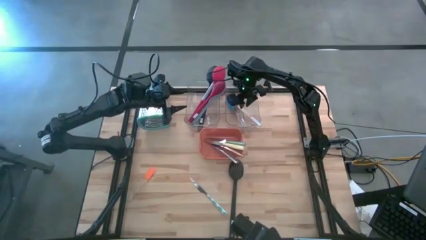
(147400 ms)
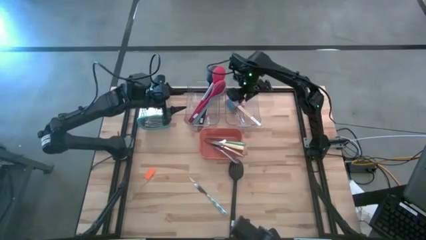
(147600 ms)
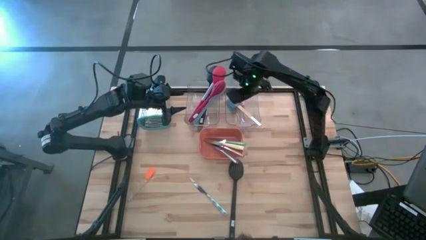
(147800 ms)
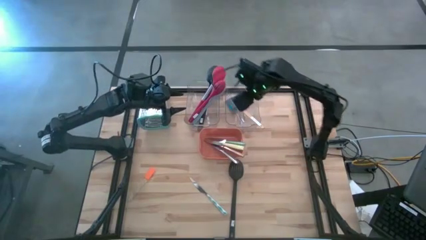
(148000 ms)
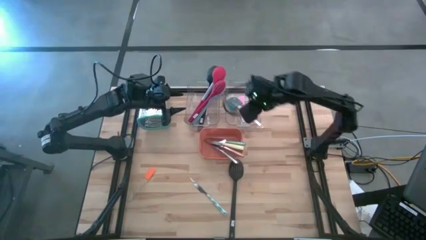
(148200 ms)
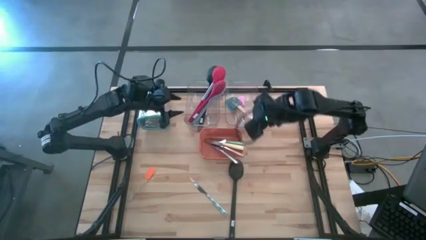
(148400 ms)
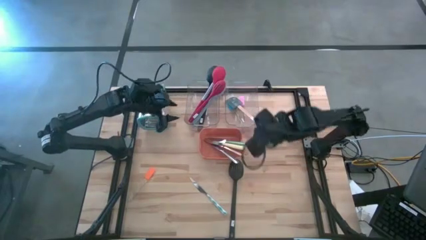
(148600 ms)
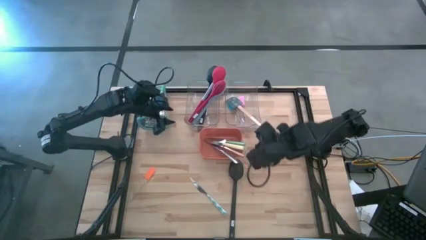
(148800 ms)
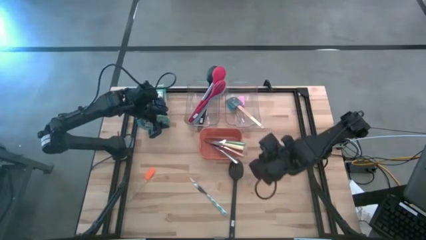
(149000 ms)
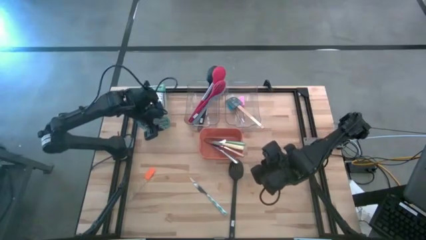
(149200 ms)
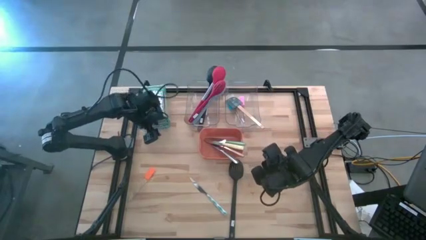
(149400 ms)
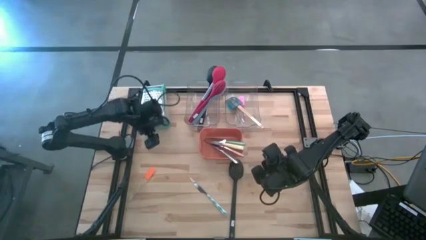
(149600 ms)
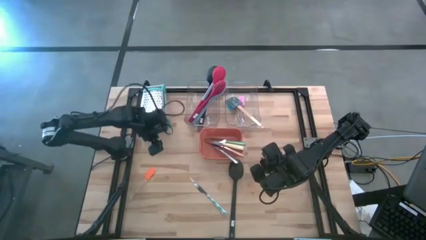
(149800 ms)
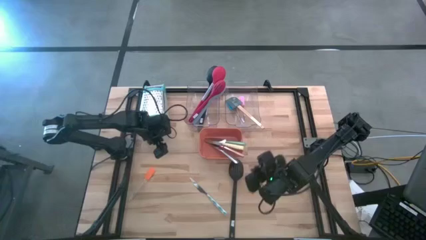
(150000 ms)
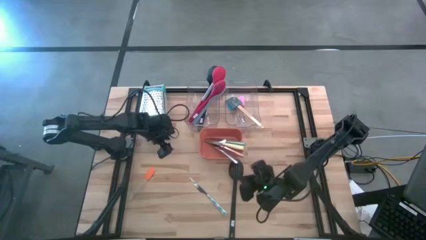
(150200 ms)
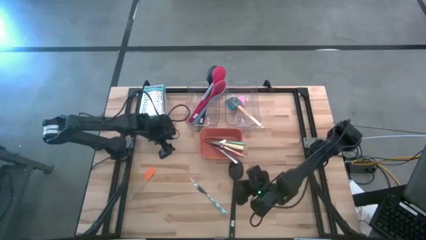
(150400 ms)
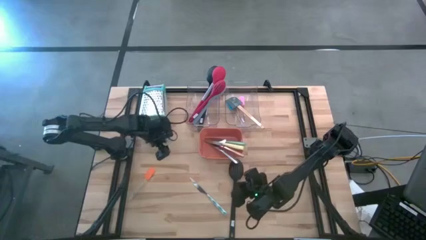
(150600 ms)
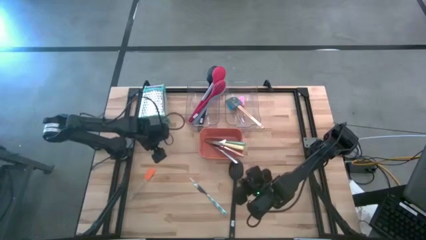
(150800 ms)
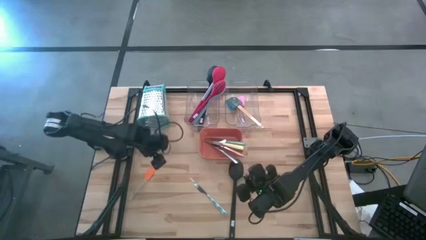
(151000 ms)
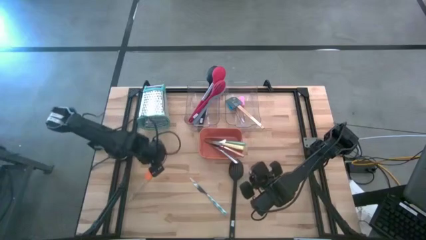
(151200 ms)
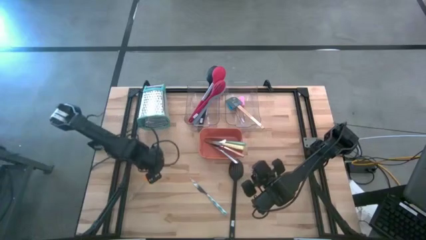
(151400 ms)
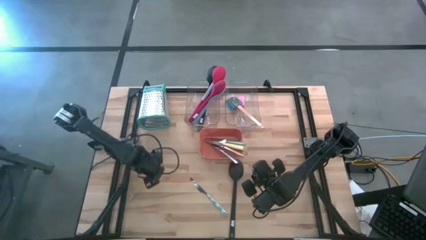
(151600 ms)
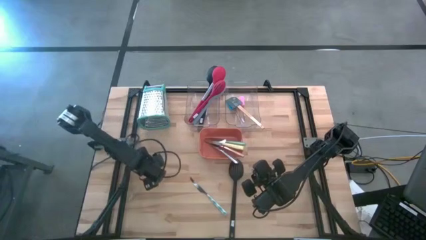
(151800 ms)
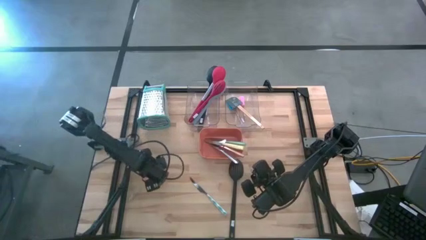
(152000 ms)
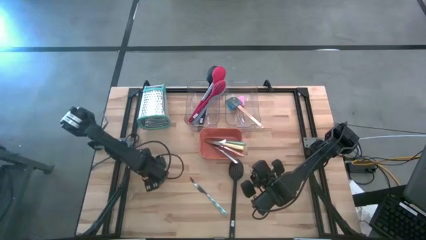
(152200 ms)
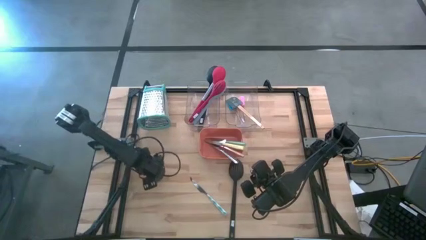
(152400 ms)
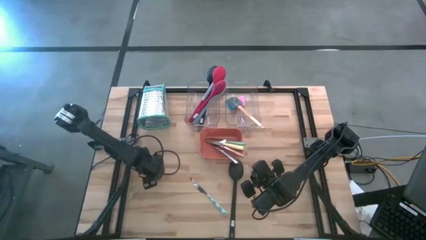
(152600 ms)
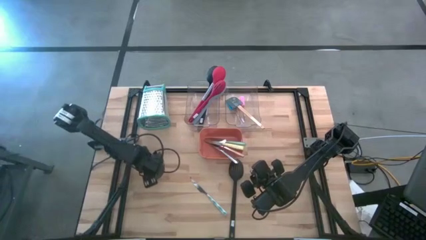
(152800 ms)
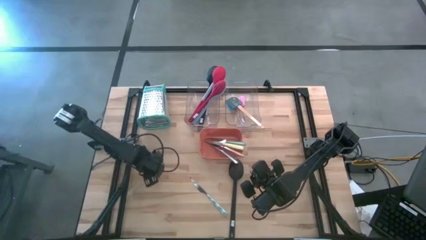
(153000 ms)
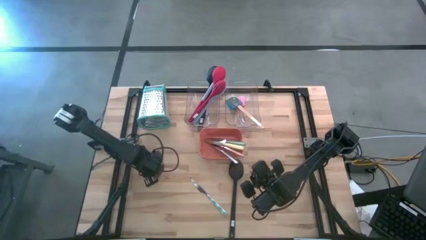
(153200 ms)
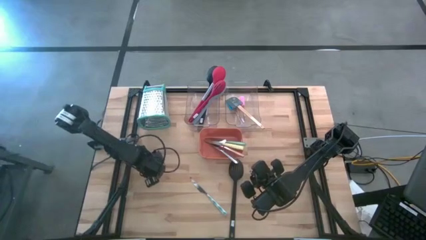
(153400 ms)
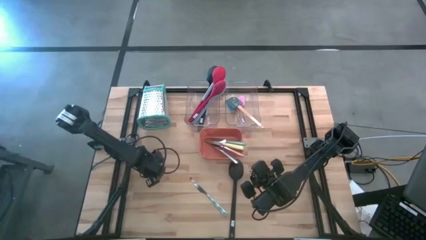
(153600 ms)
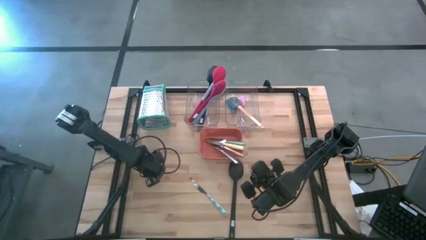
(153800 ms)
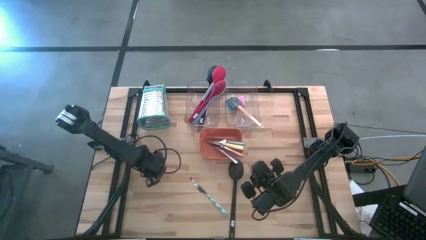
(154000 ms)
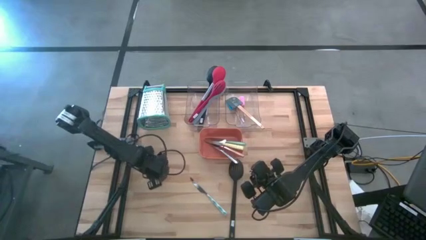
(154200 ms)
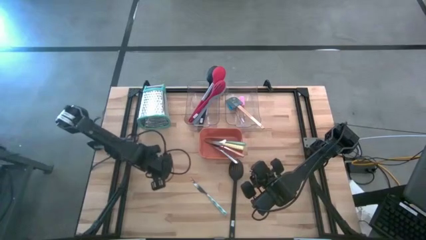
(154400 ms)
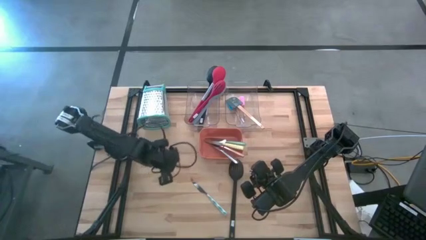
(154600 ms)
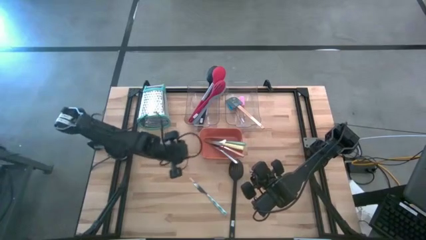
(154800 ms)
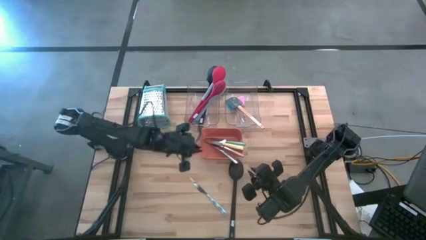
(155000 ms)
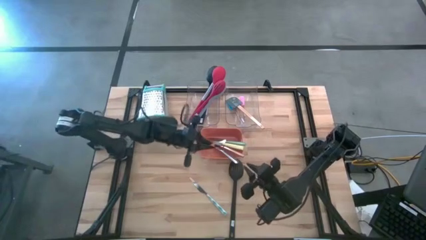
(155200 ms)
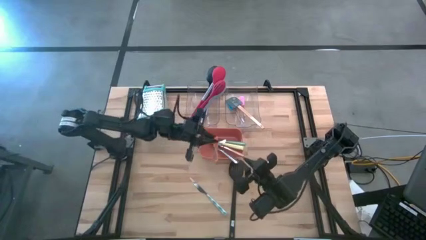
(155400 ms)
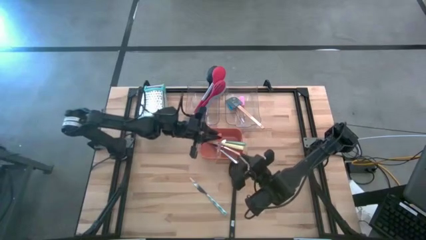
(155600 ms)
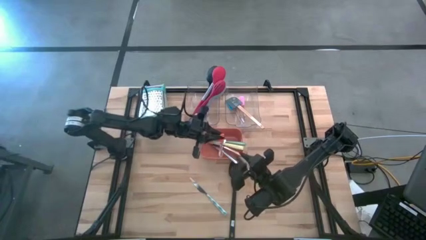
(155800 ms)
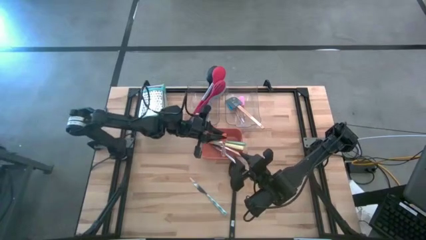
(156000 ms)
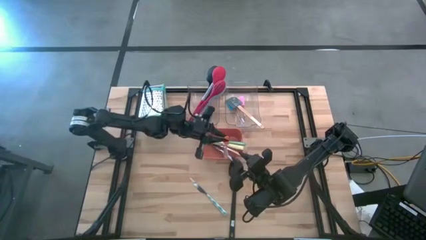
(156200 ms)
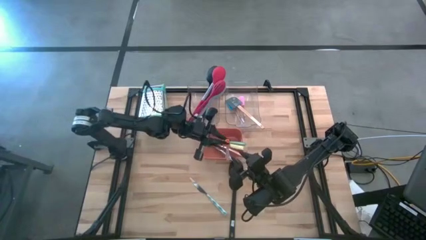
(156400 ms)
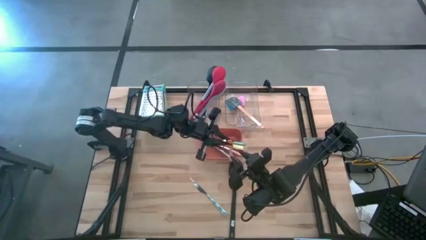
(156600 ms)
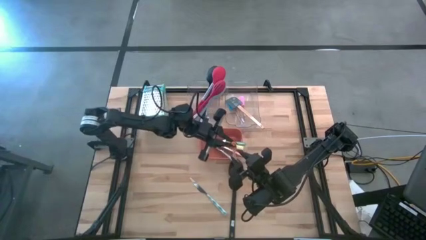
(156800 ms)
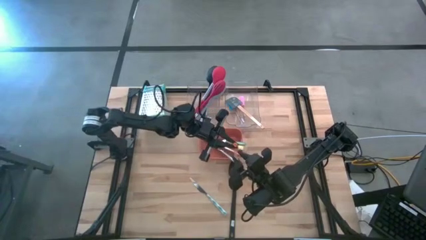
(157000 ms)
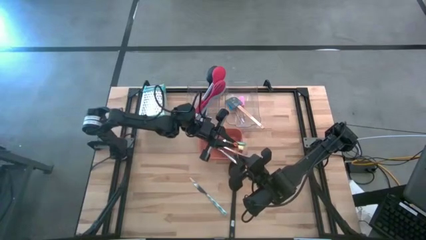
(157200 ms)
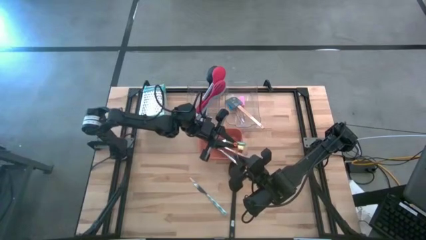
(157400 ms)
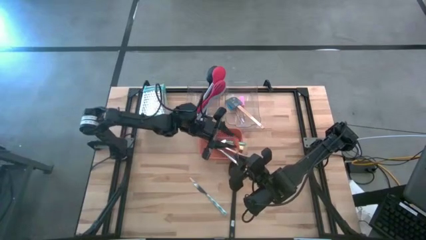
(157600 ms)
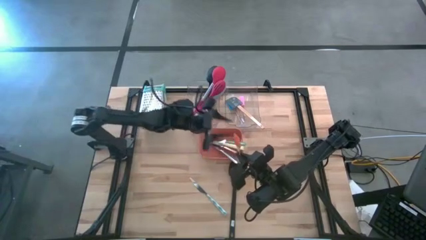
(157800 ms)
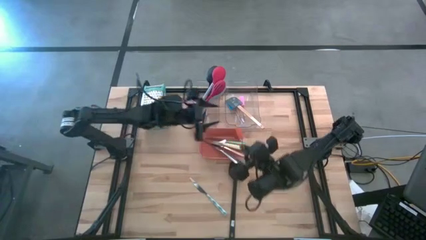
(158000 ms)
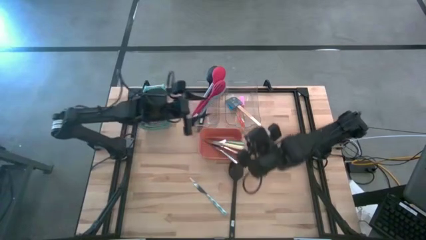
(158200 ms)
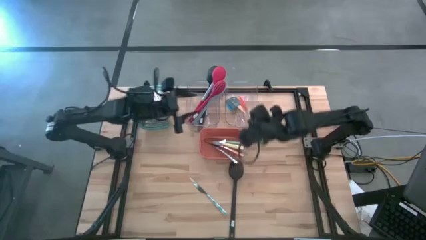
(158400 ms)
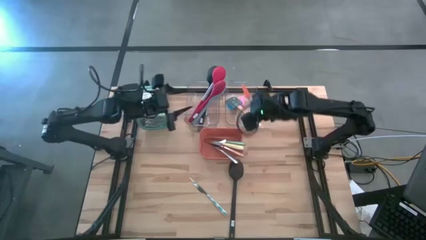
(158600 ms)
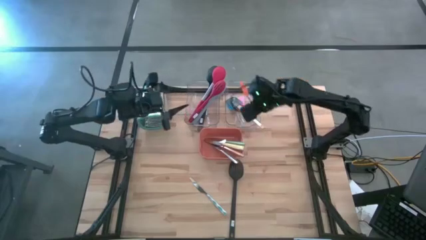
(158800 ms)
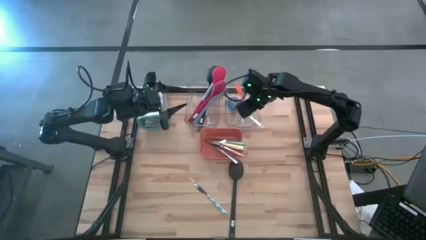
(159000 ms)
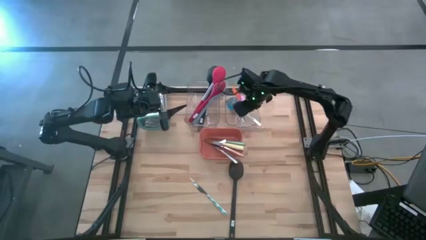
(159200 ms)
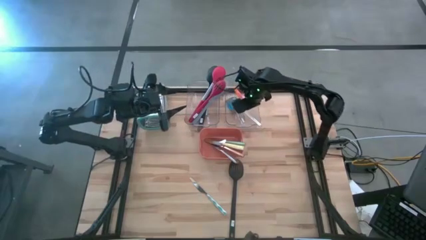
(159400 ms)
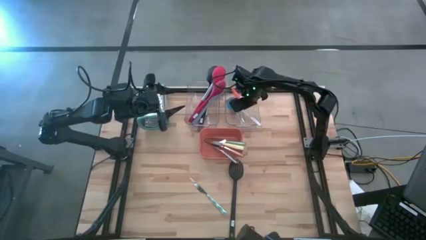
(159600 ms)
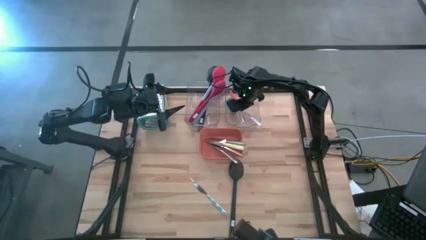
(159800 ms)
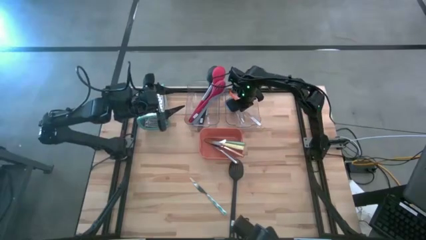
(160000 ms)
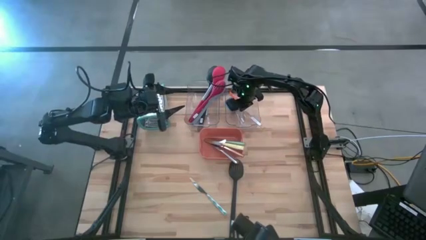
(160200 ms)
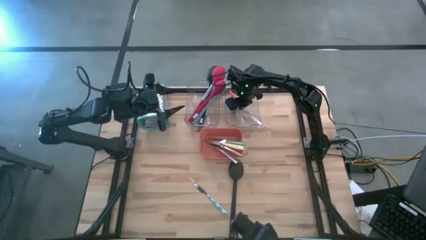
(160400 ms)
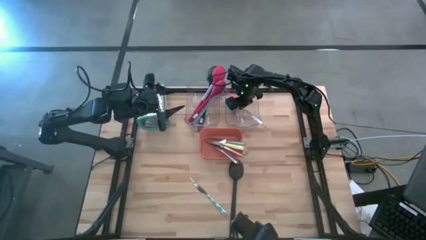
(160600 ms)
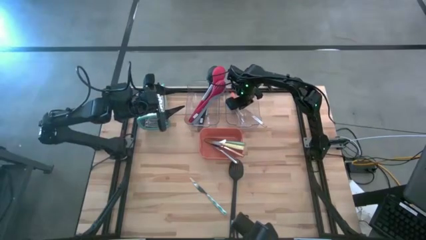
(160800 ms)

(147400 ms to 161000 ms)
Task: Pick & Place Kitchen Items
Put the orange spatula into the right transparent bin

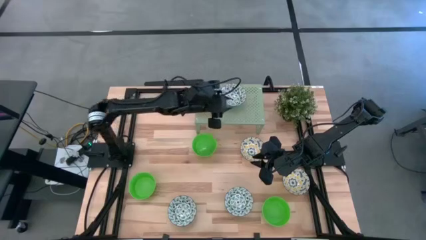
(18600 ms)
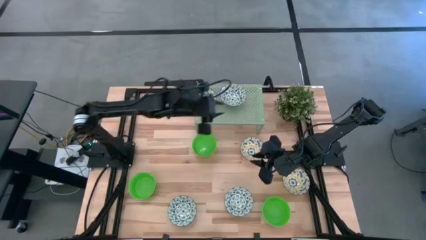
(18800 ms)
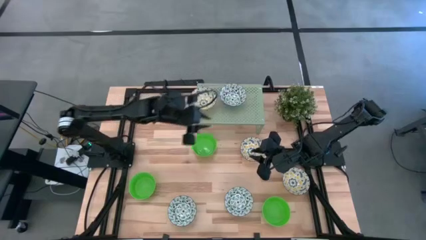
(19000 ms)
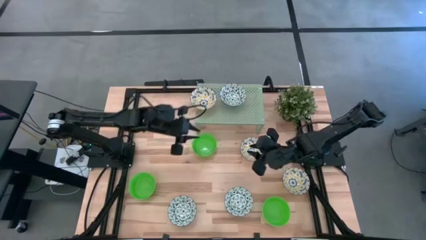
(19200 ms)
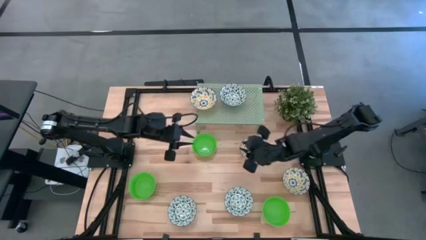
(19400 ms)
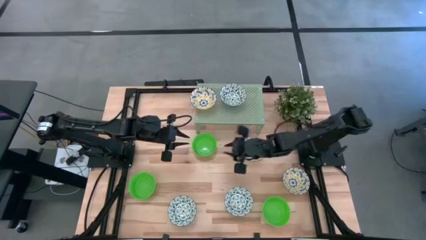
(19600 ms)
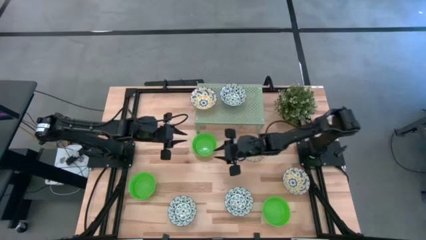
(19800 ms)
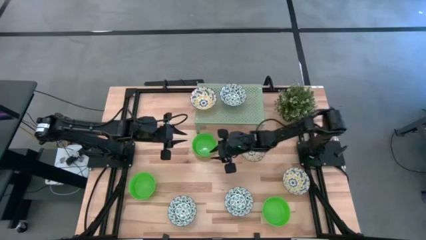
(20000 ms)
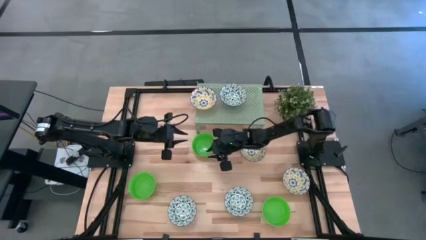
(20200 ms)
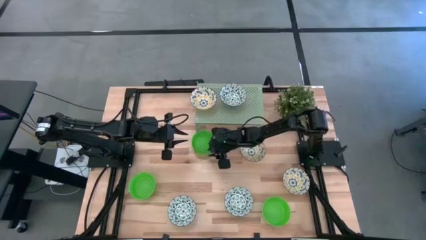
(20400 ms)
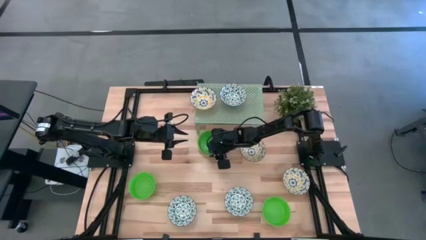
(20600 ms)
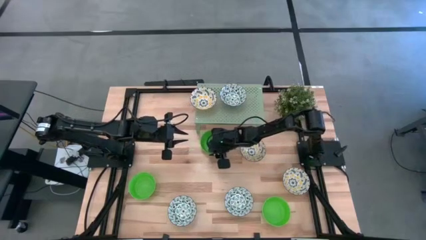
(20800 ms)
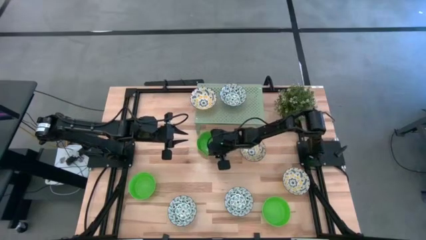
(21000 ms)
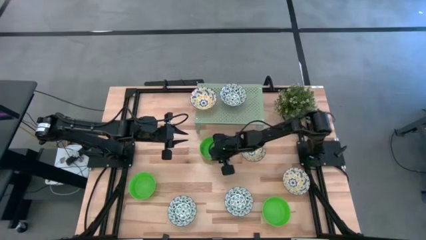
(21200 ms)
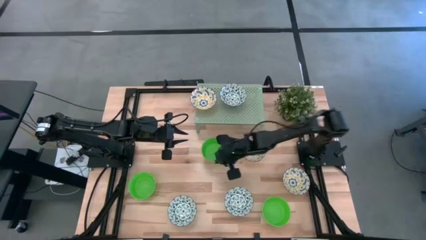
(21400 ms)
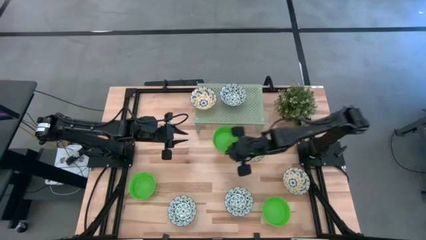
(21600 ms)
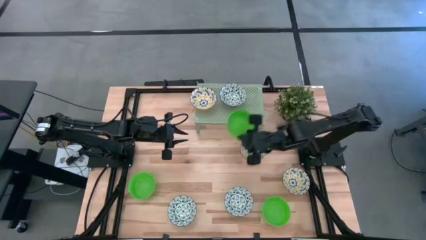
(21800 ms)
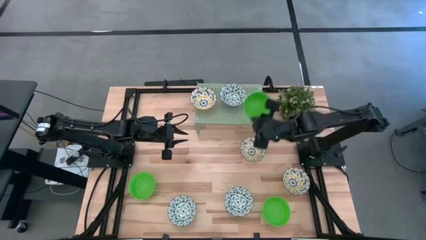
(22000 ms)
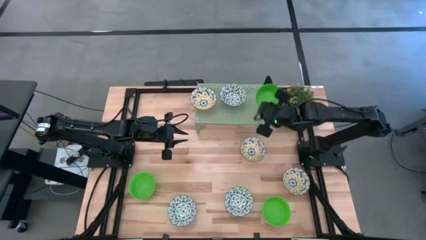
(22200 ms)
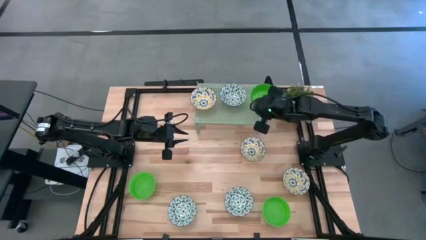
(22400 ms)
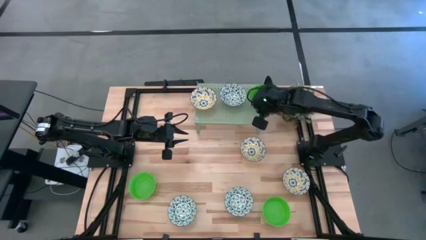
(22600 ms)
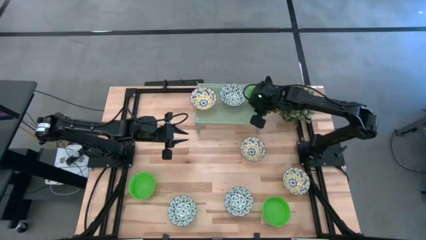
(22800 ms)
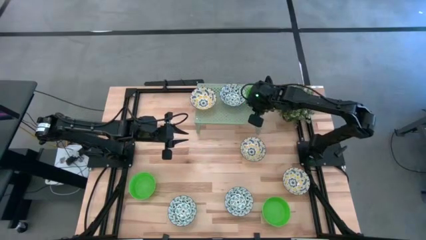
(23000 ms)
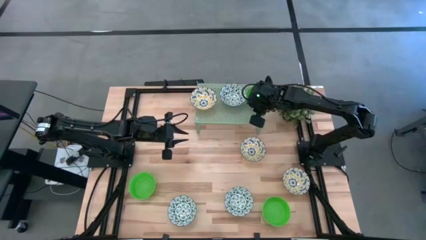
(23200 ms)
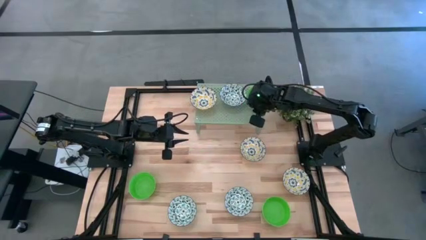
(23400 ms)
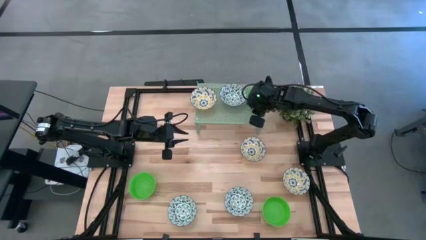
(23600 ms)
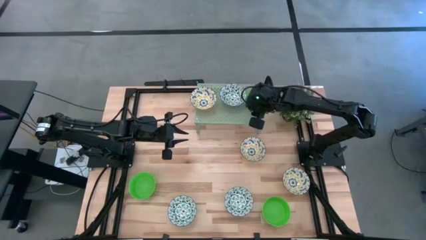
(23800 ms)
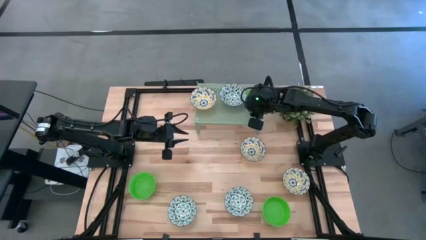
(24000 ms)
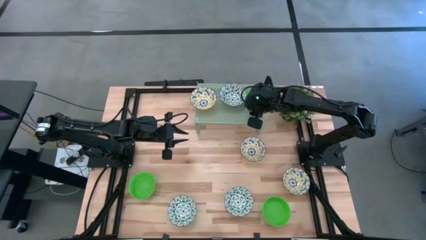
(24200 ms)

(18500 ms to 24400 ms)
Task: Pick & Place Mini bowls
Put the top green bowl on the shelf
